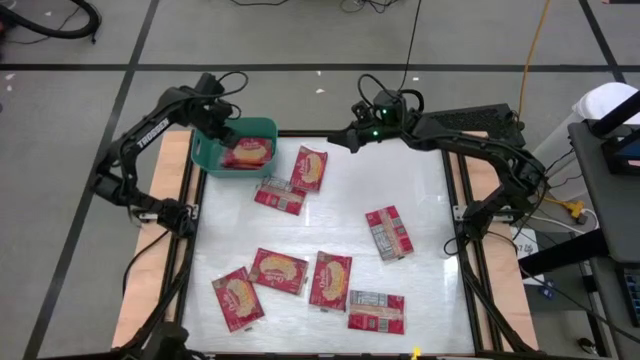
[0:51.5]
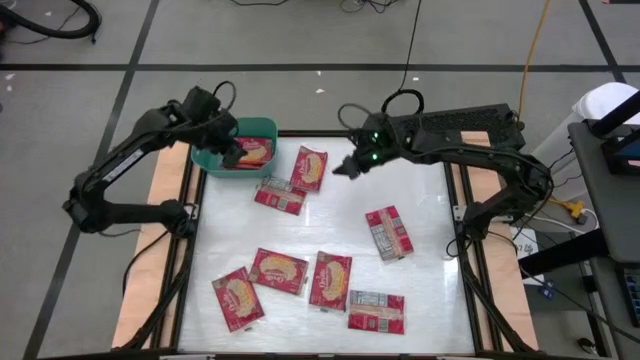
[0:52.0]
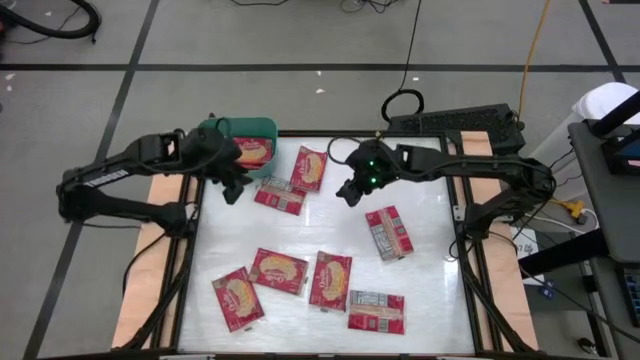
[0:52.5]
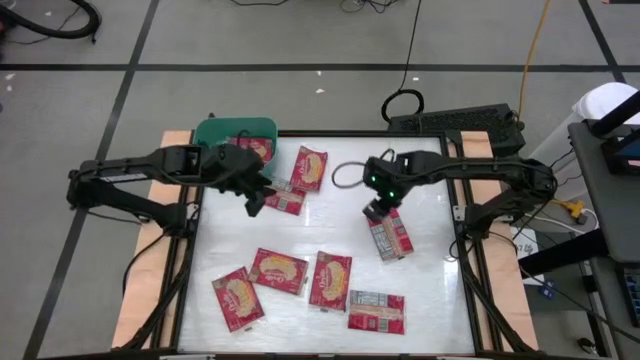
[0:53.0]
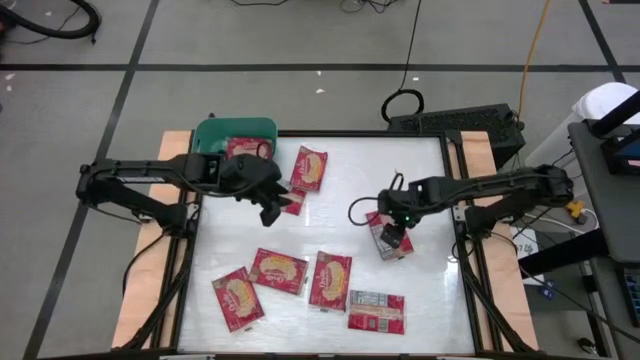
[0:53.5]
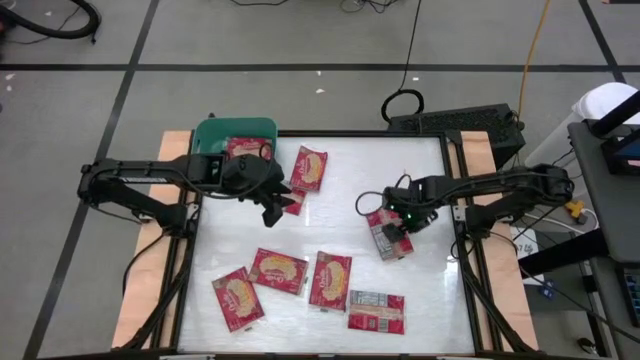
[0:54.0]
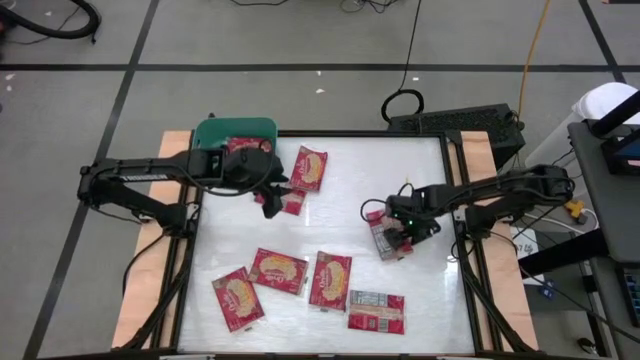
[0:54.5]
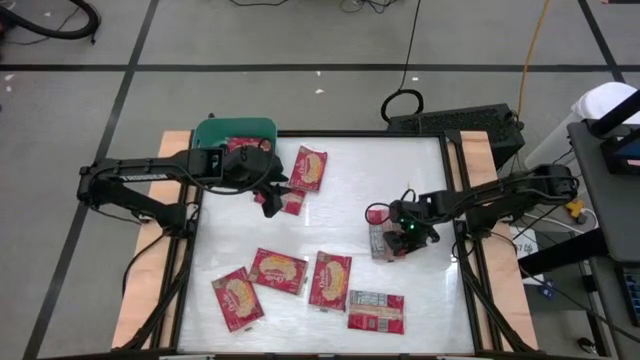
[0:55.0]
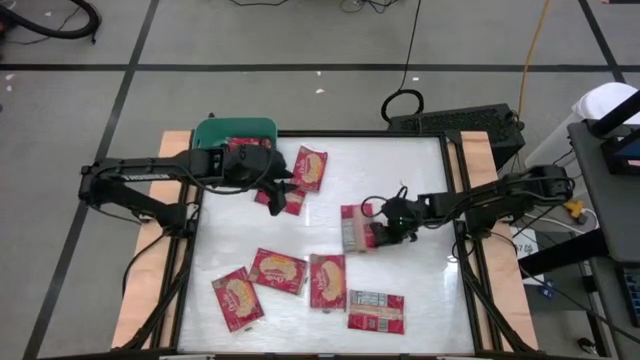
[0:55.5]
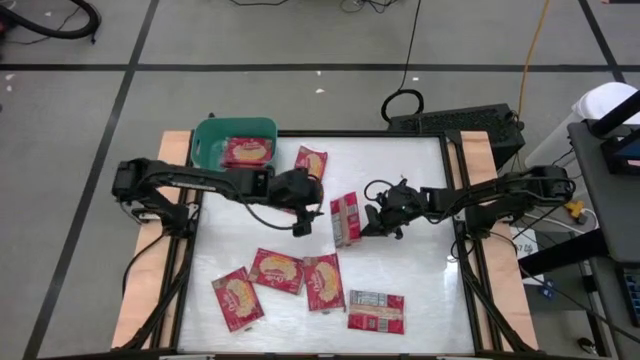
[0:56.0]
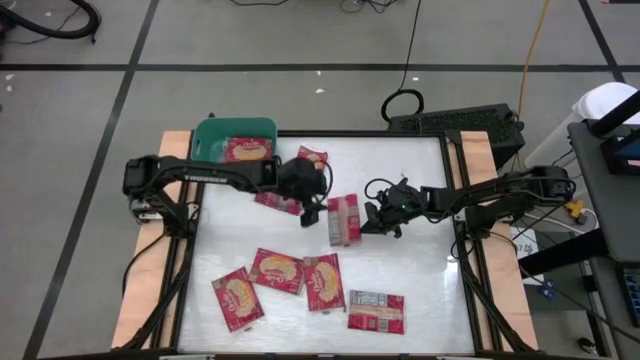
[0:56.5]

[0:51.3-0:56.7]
Task: Sort popcorn bags into baskets
Put the red popcorn bag into the green bin

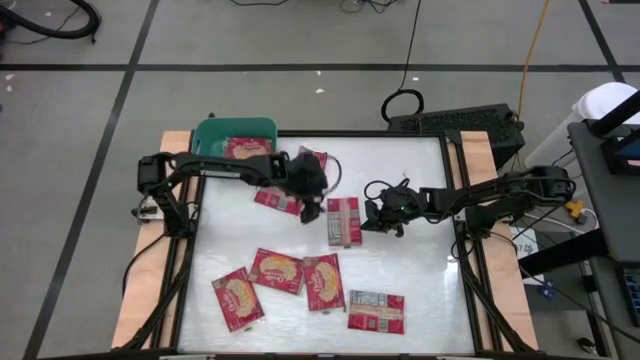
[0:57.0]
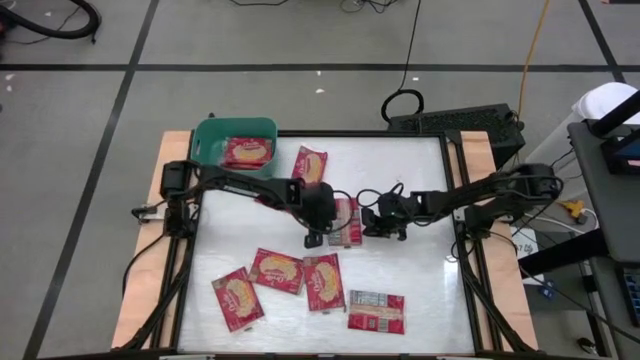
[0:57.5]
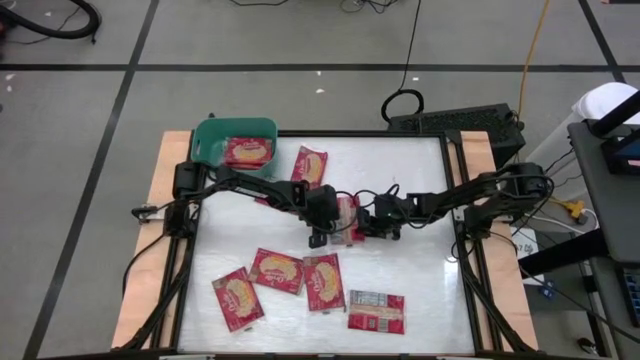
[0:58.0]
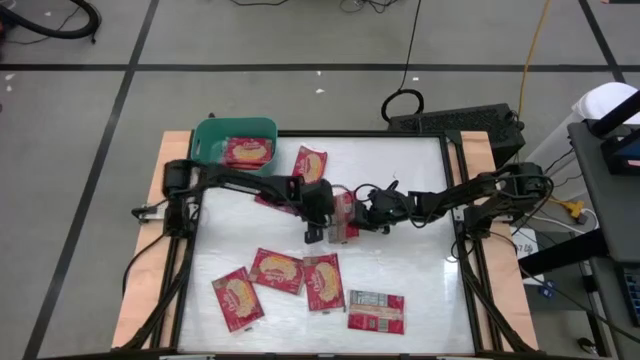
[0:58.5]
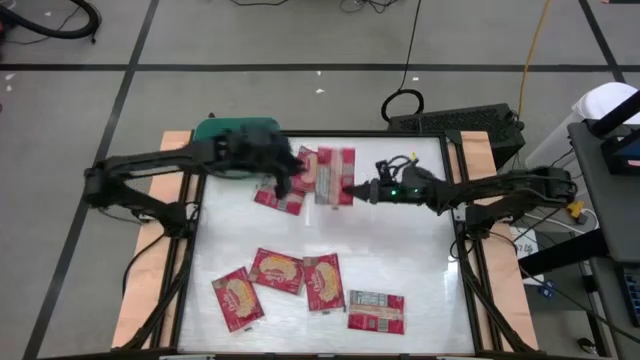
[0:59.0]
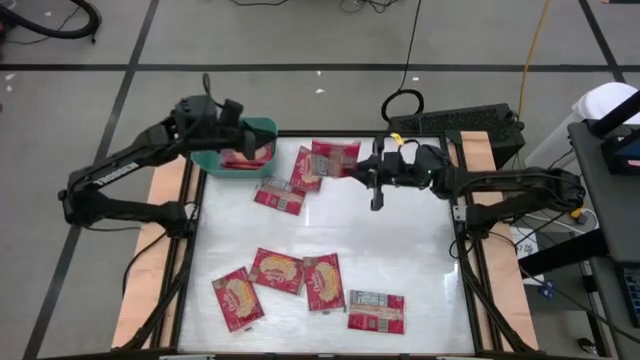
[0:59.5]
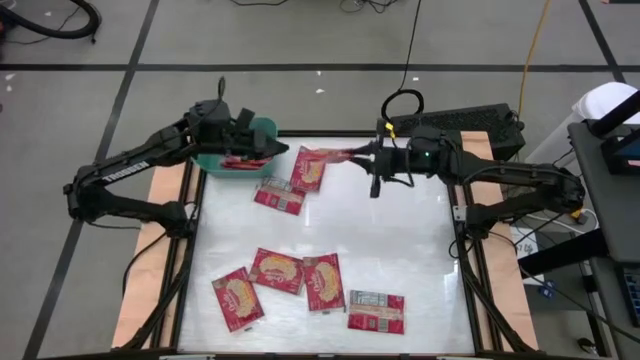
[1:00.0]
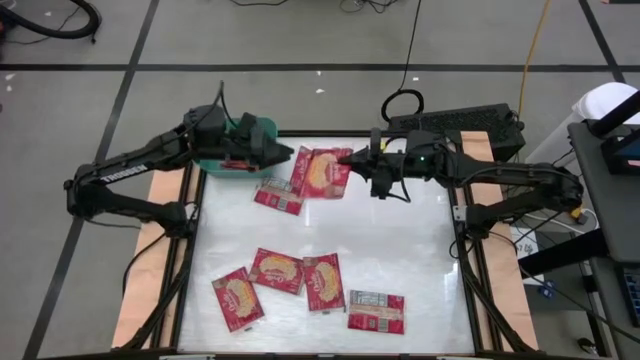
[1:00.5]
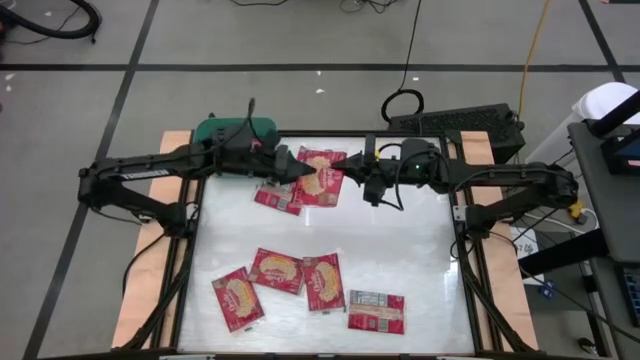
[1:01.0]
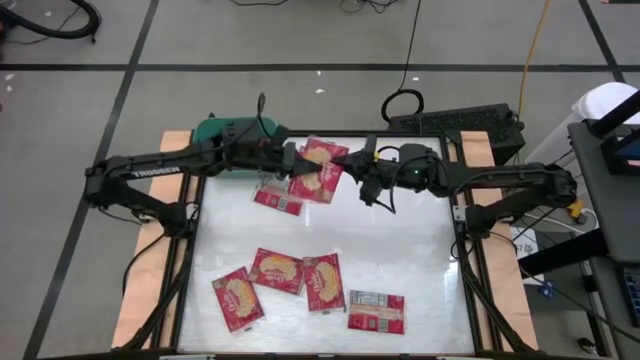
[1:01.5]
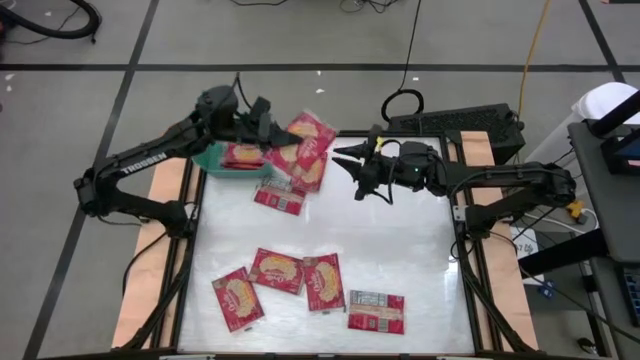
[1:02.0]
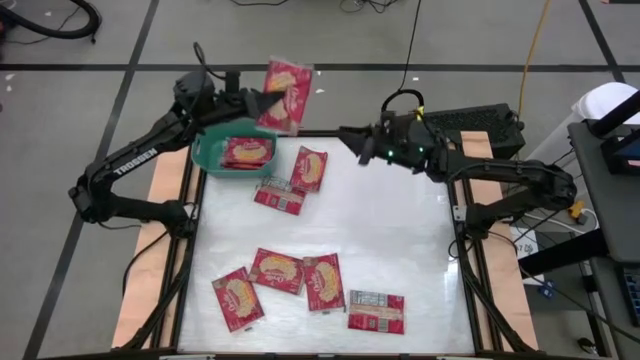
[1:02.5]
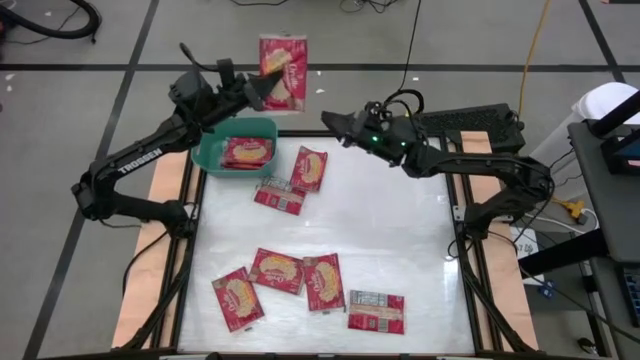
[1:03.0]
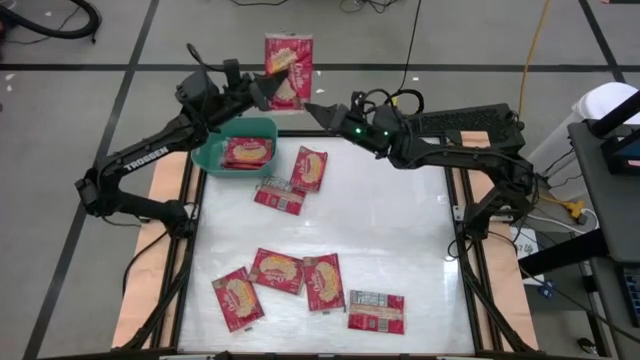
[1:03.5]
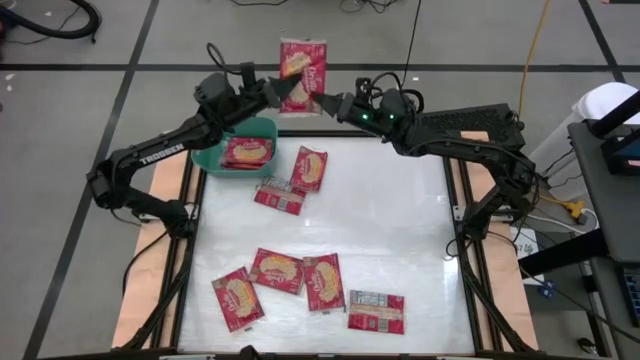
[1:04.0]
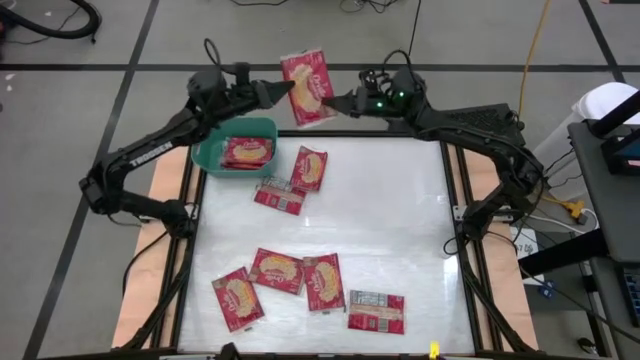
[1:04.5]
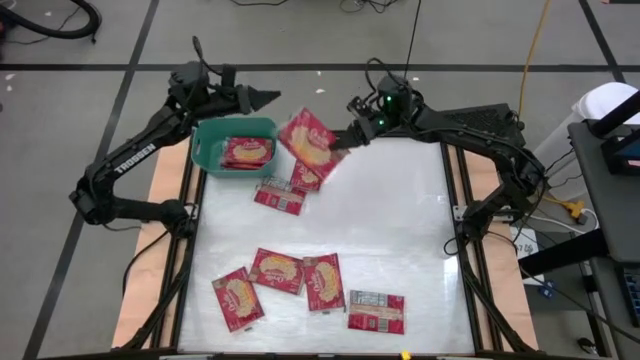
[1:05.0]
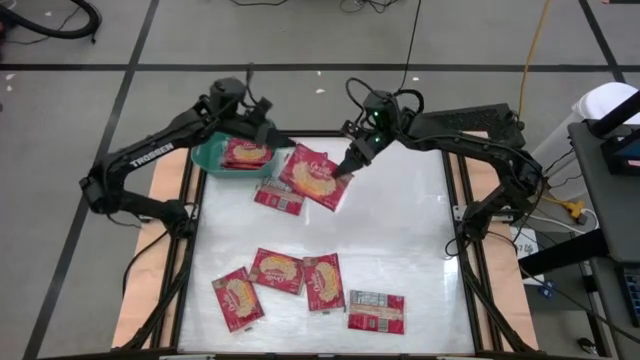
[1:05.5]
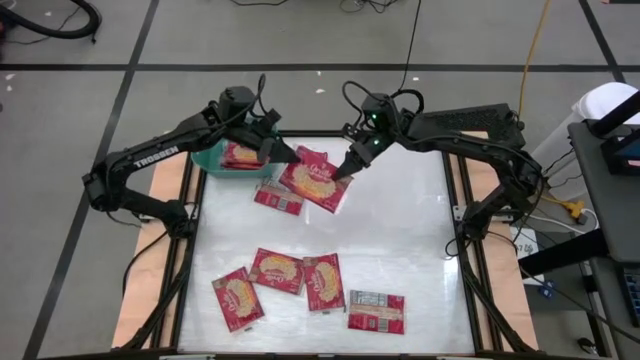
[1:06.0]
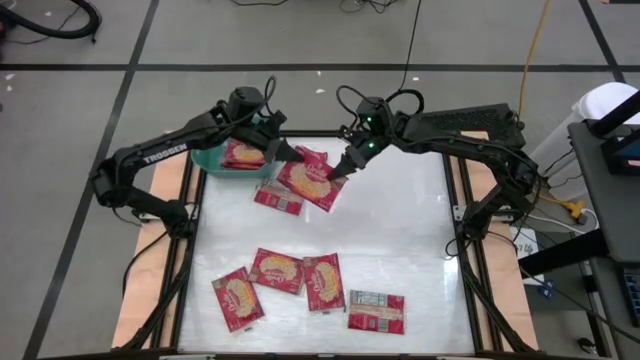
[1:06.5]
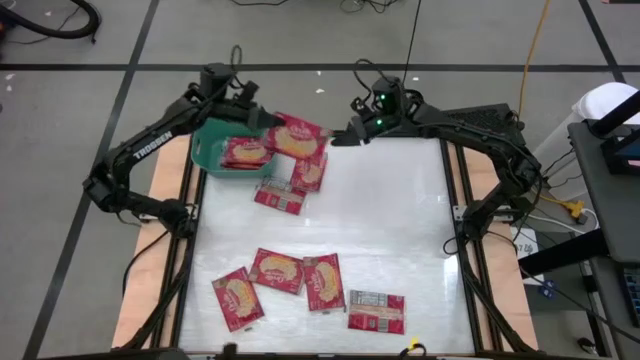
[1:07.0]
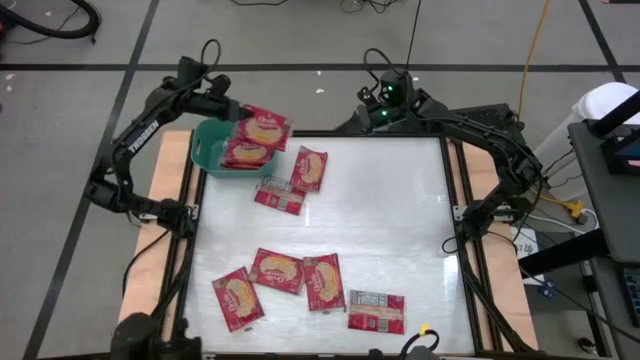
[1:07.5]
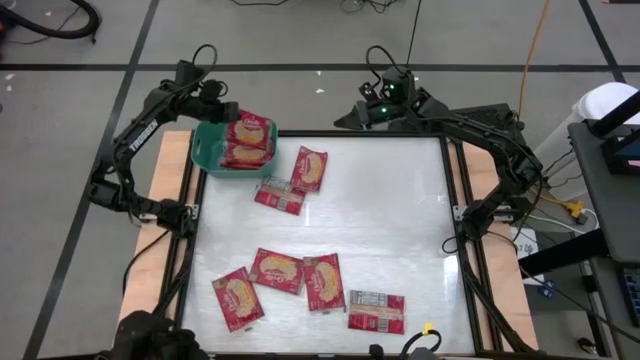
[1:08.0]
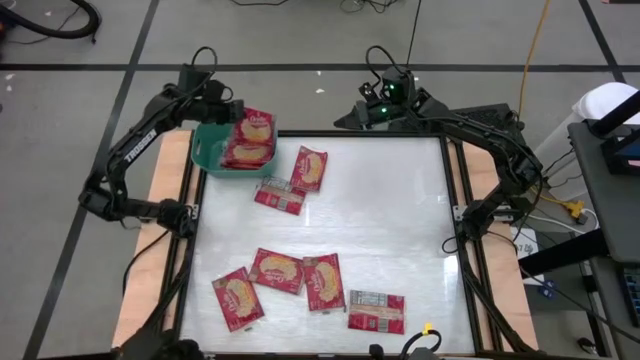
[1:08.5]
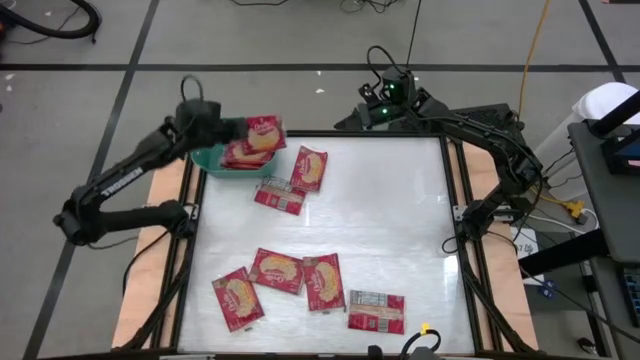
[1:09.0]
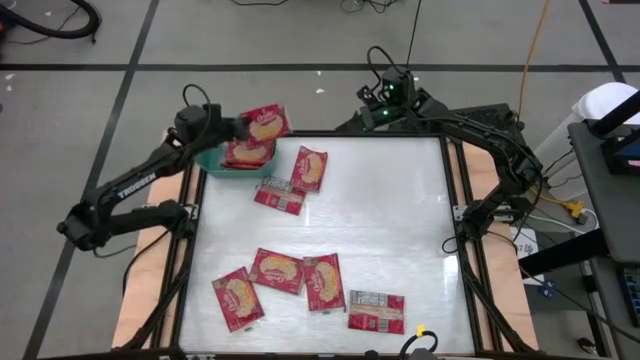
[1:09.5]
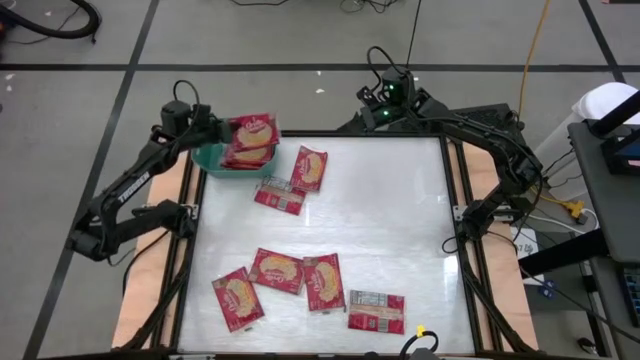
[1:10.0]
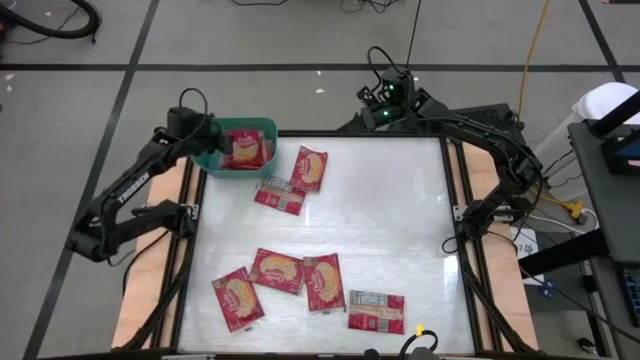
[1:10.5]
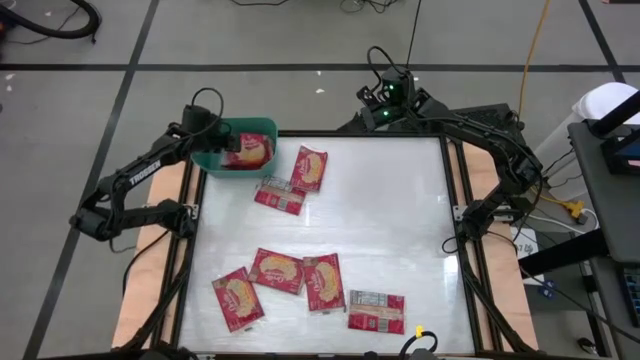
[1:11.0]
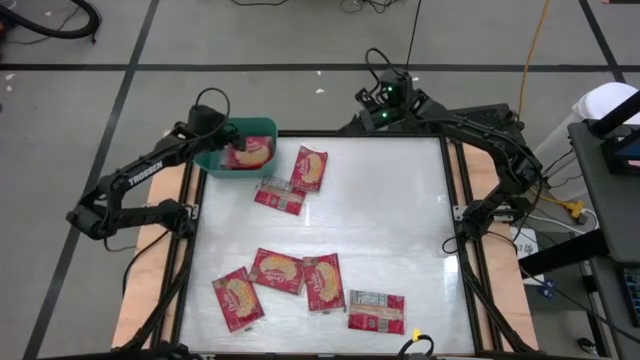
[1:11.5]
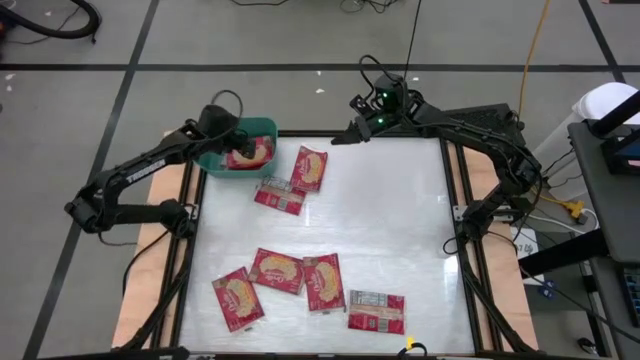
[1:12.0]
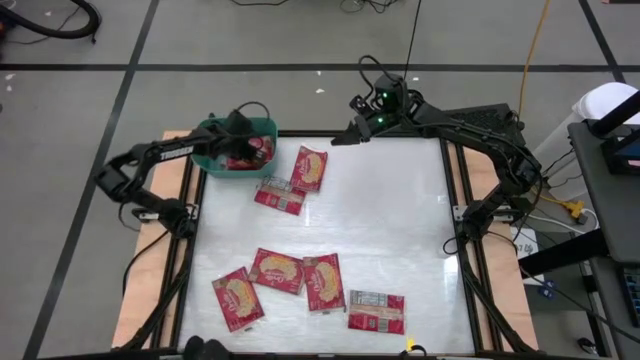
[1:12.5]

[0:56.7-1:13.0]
Put the red popcorn bag into the green bin
